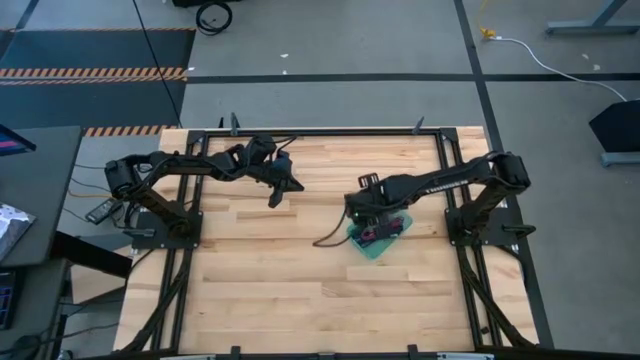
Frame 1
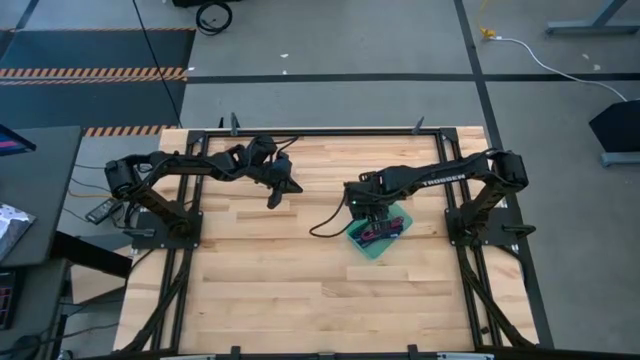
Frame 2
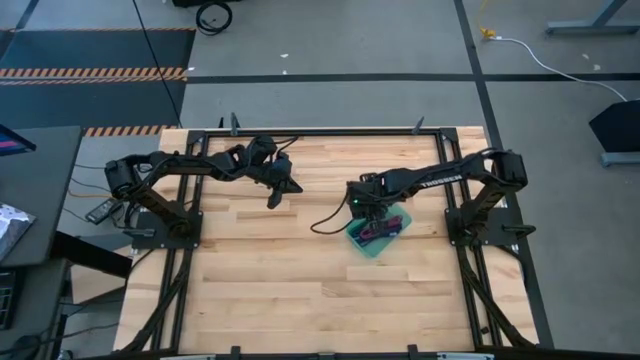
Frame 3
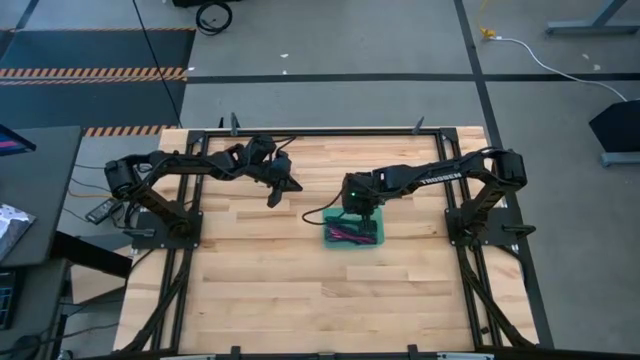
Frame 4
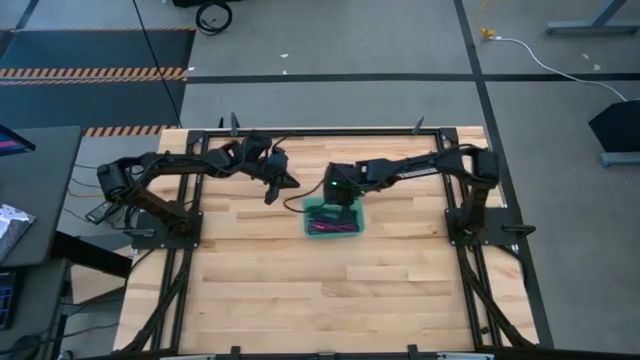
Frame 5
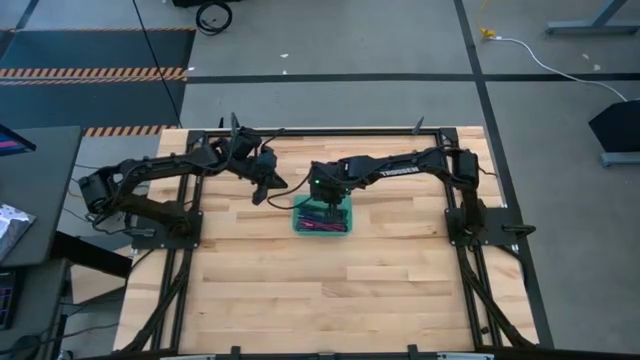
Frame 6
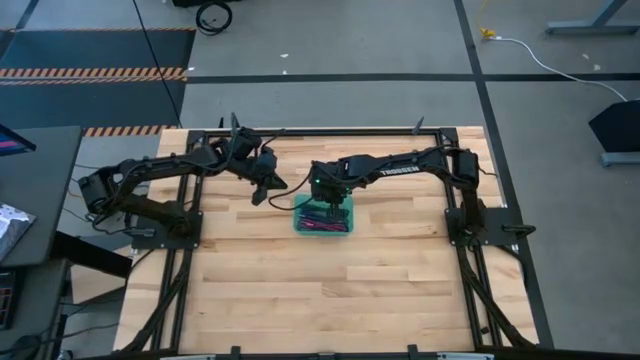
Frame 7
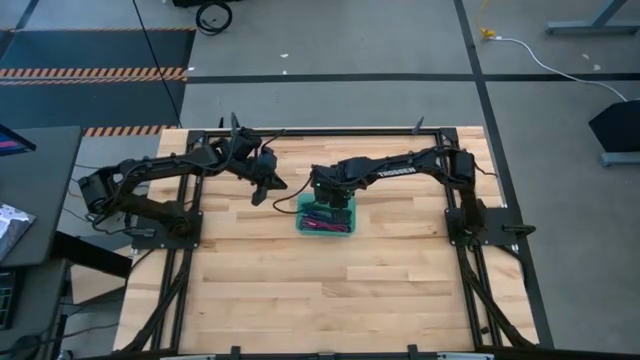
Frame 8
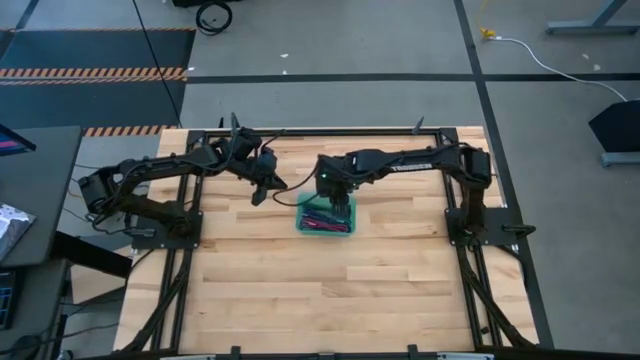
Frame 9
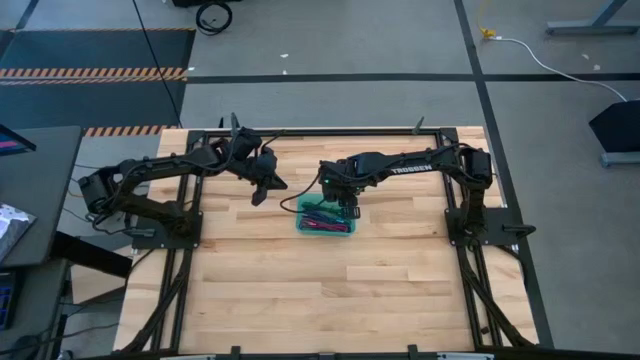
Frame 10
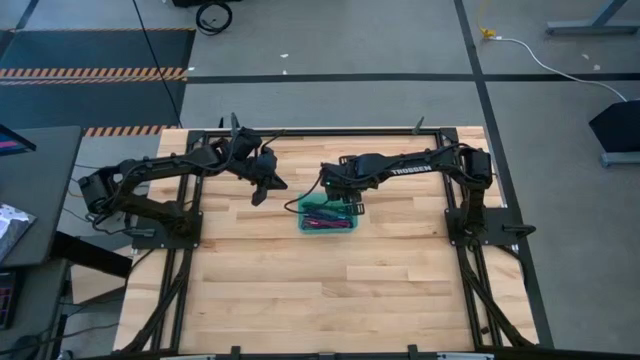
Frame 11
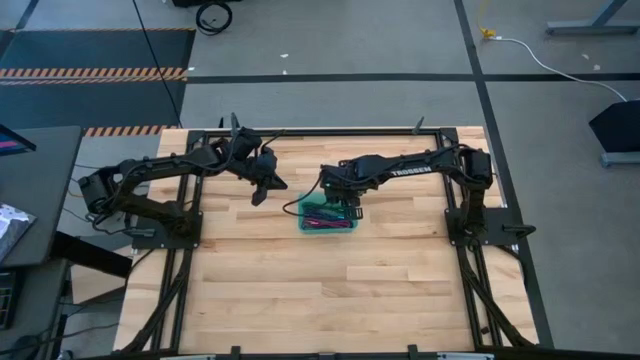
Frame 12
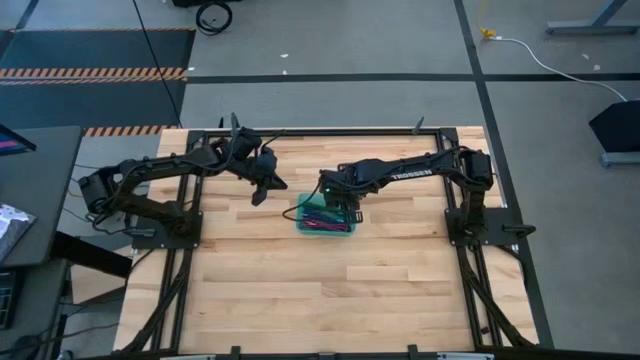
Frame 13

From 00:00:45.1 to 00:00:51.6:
Task: Pick and place USB-C Cables
Move the green bin on the table

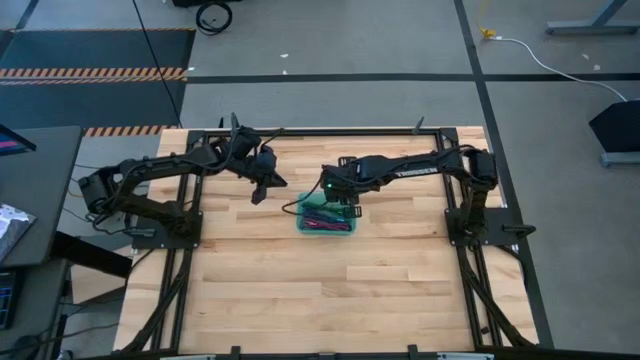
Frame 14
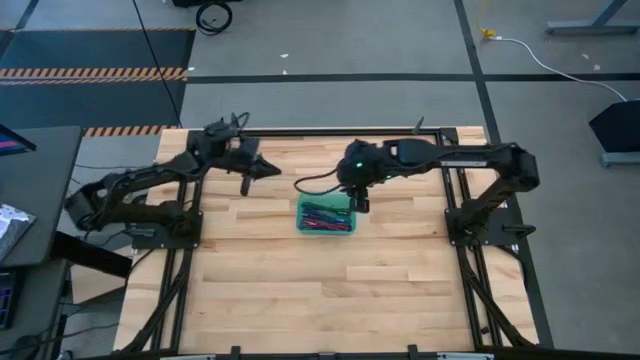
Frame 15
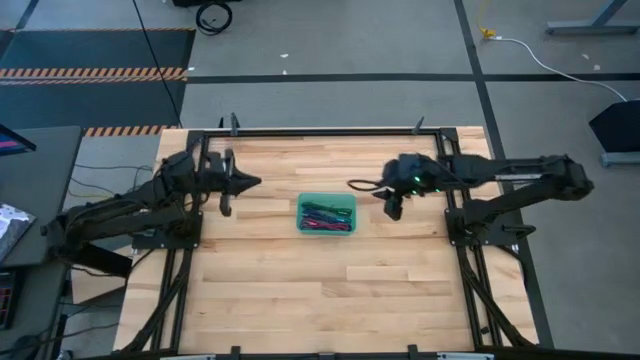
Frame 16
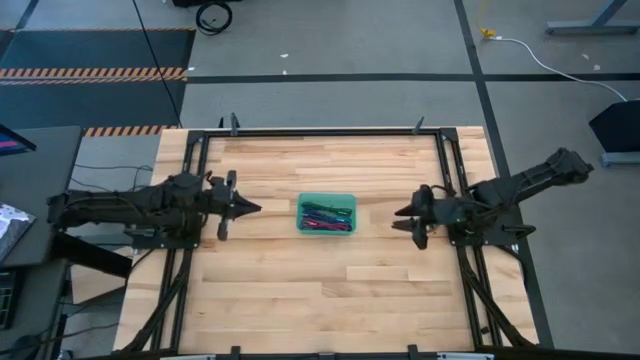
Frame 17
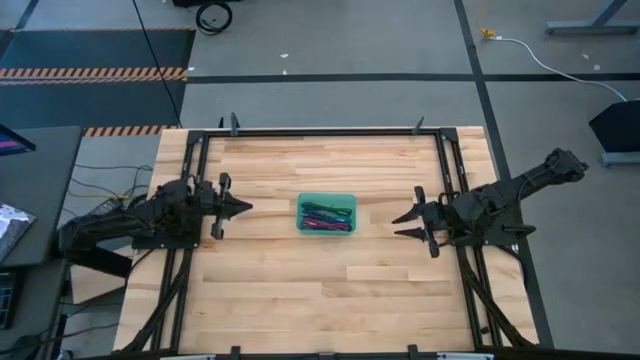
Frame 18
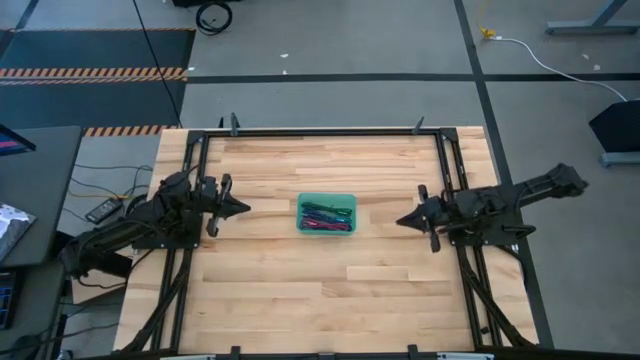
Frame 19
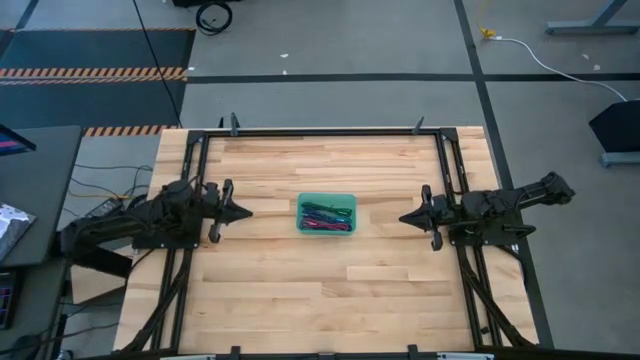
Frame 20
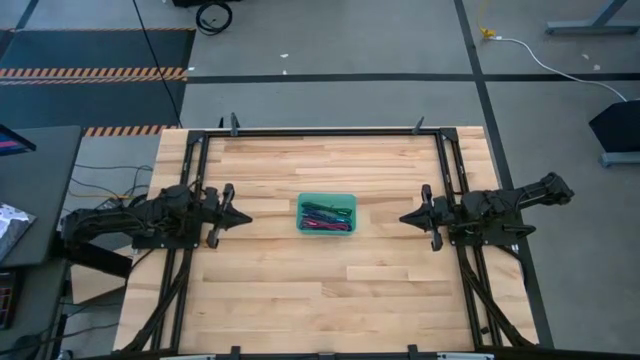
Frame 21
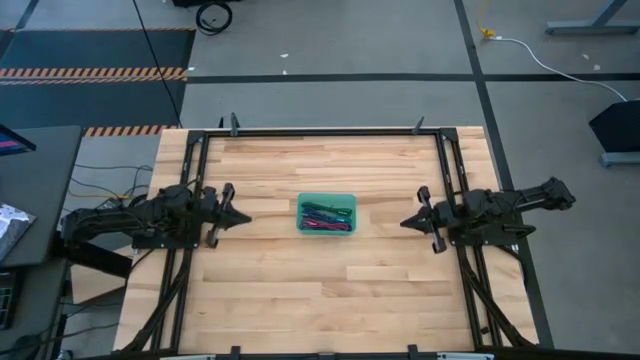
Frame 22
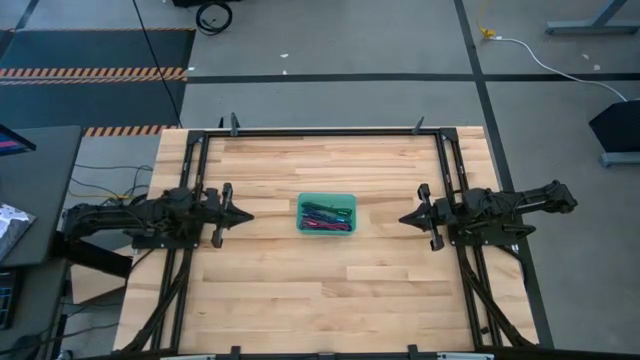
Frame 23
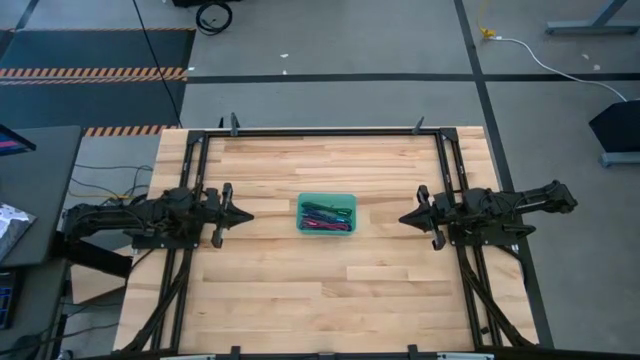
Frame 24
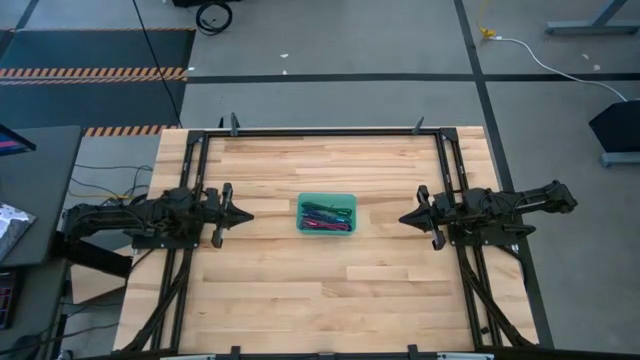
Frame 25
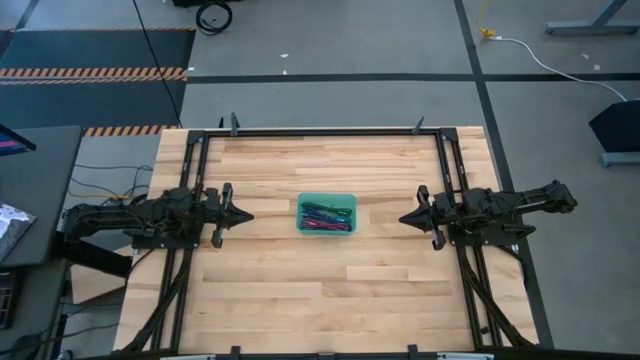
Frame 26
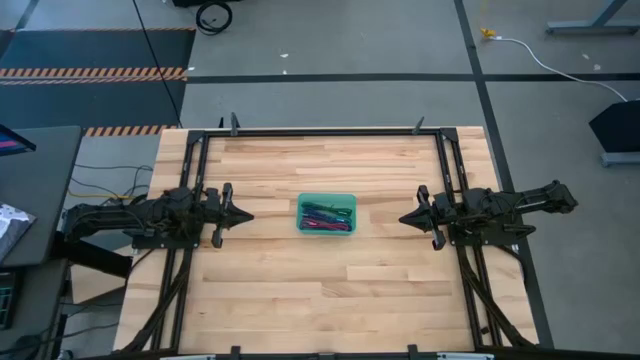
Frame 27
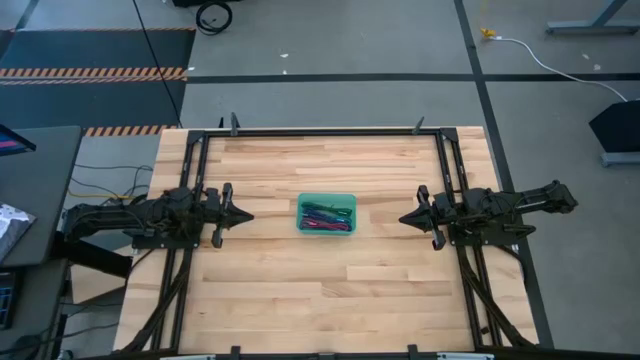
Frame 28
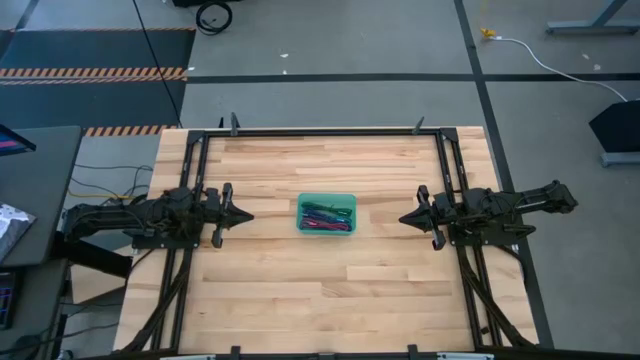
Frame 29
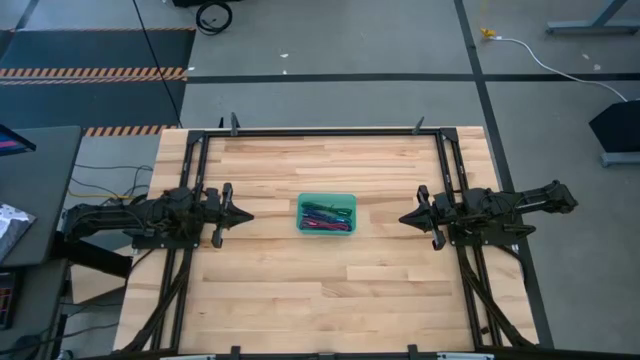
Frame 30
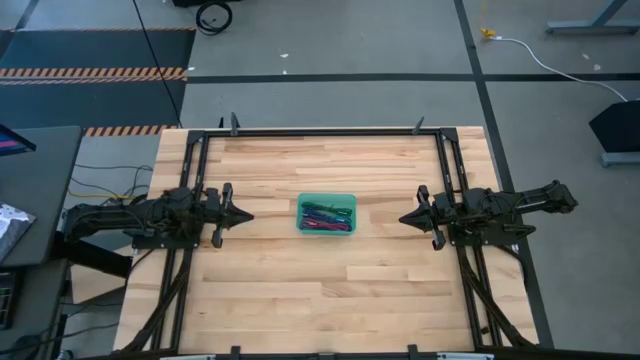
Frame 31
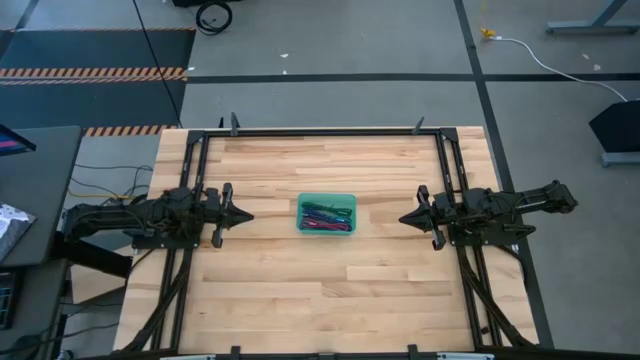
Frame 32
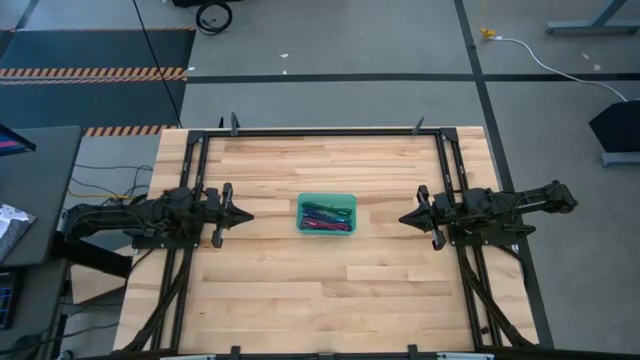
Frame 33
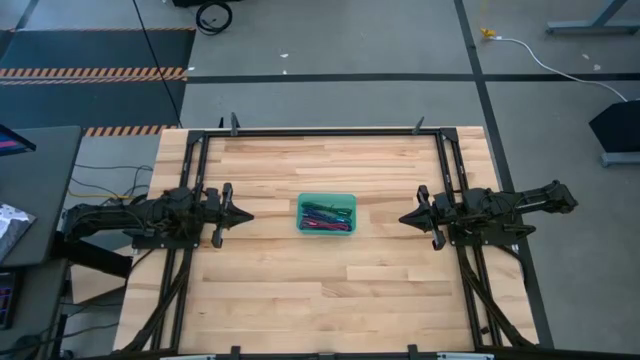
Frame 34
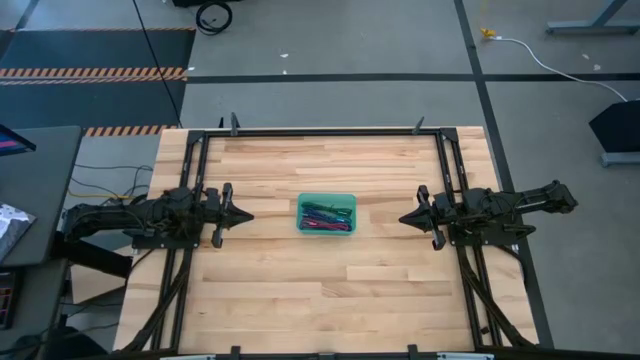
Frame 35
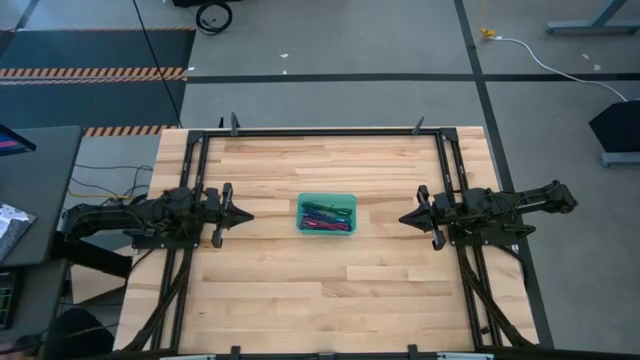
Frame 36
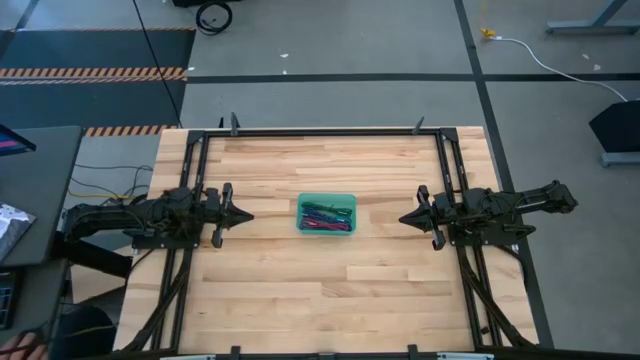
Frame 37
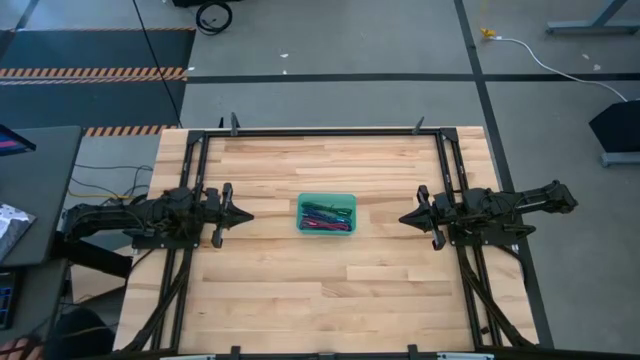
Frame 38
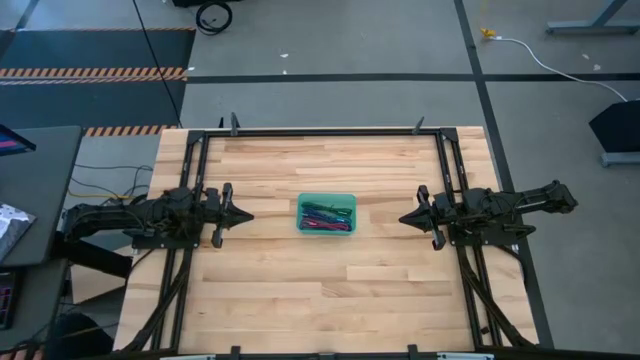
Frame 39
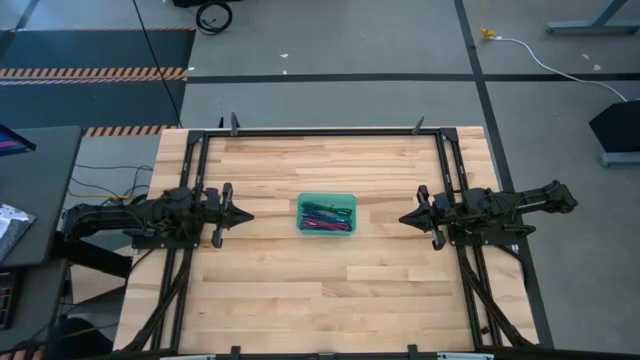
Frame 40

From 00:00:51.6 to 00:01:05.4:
Return to Home Position

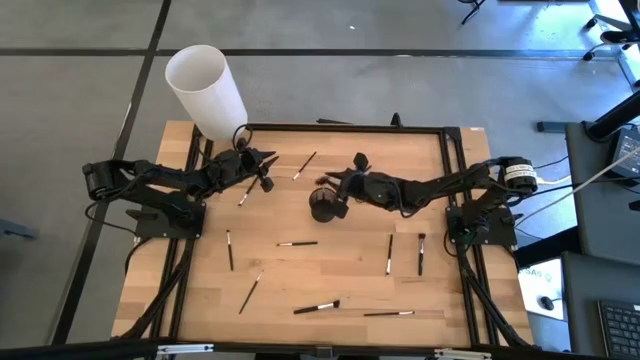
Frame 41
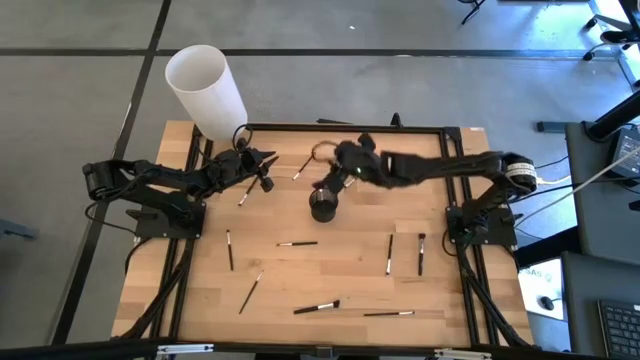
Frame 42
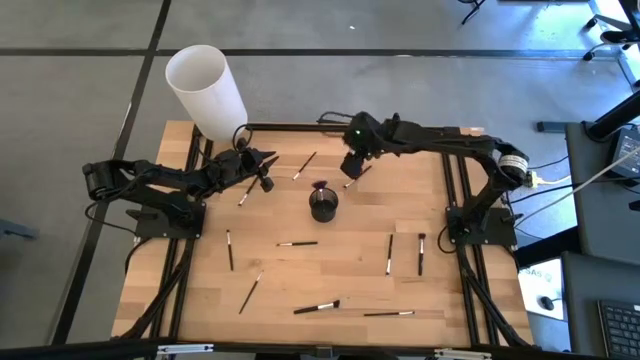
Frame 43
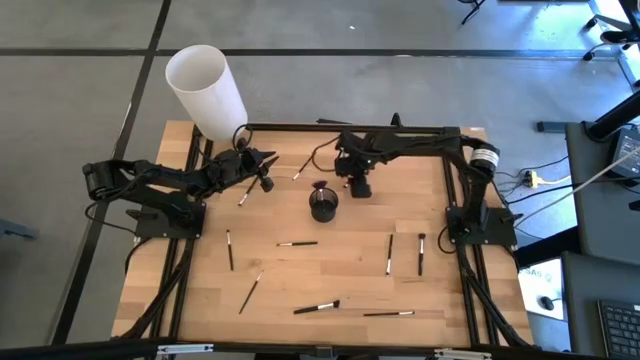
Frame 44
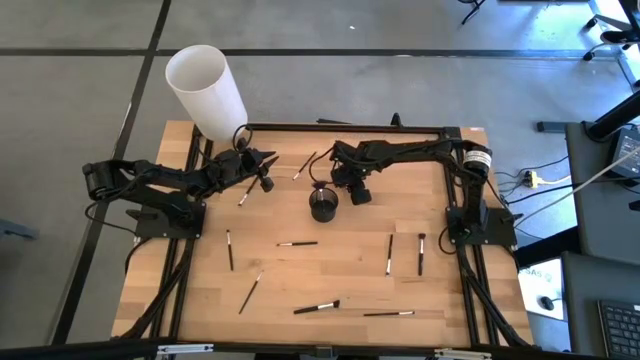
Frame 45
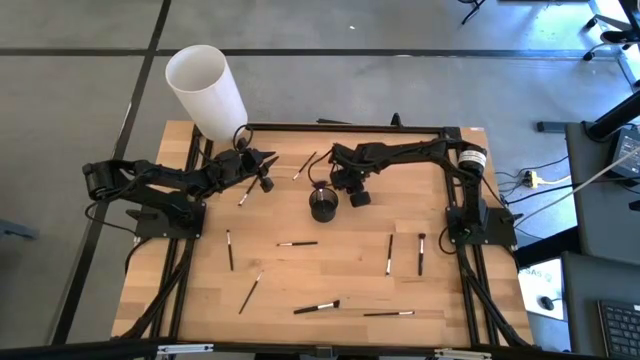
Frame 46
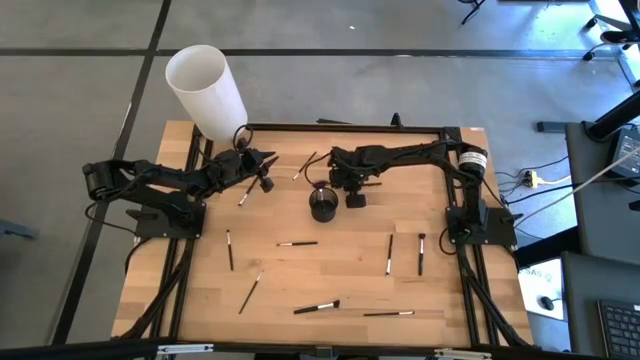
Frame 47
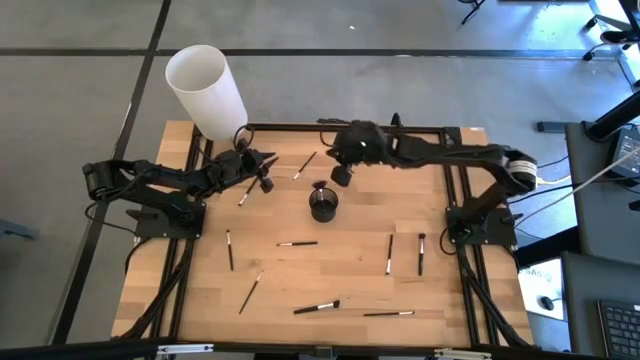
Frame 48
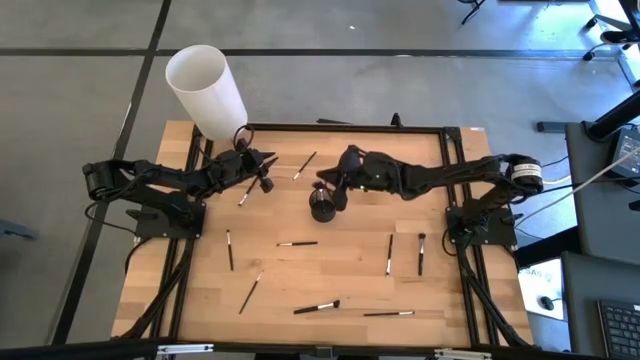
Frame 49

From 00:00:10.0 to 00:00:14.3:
Task: Pick & Place Makeup Brushes
Put the eyeshadow brush into the makeup brush holder
